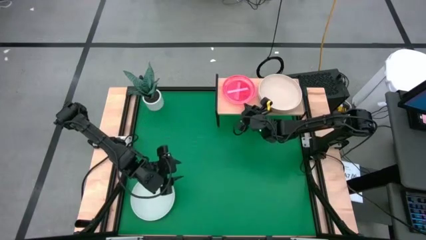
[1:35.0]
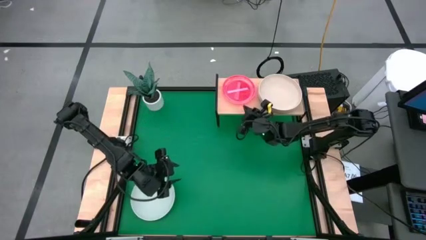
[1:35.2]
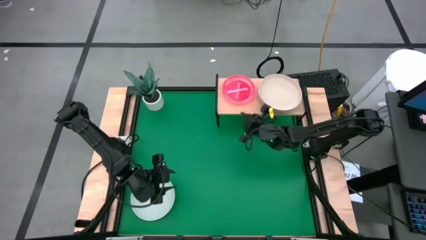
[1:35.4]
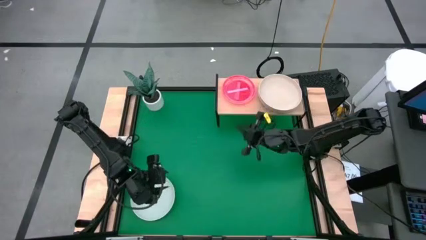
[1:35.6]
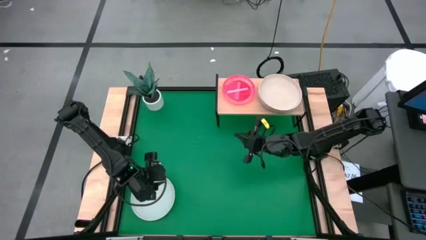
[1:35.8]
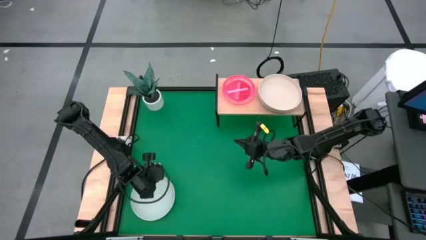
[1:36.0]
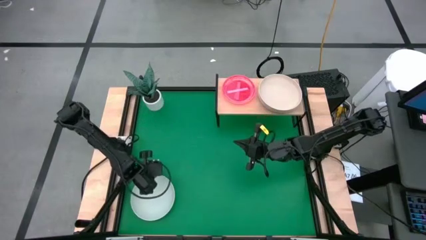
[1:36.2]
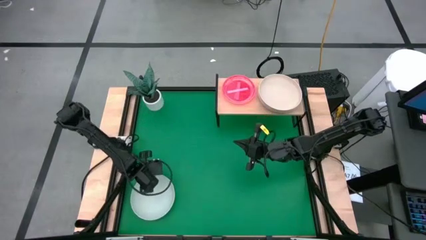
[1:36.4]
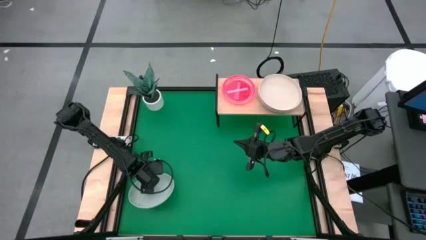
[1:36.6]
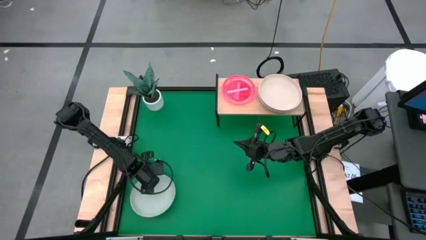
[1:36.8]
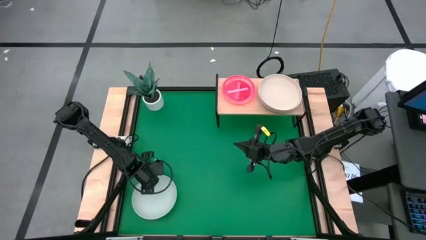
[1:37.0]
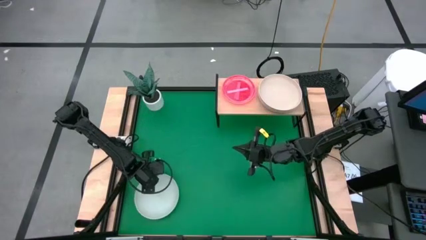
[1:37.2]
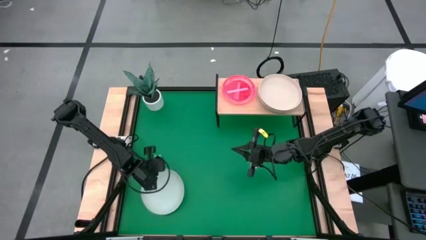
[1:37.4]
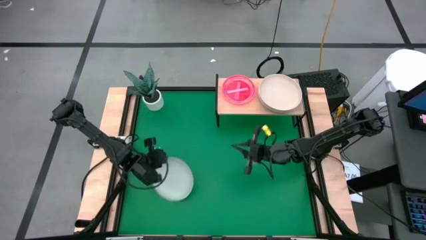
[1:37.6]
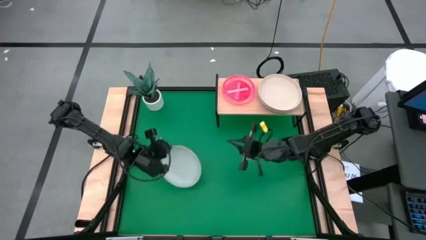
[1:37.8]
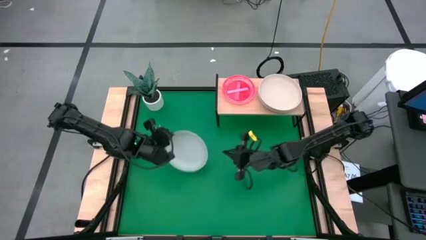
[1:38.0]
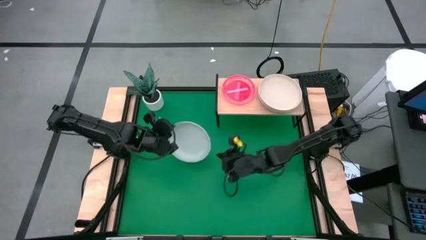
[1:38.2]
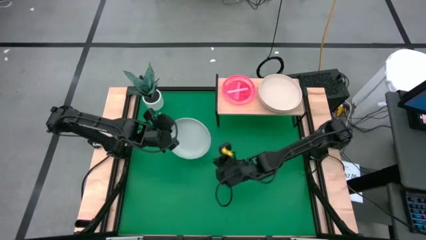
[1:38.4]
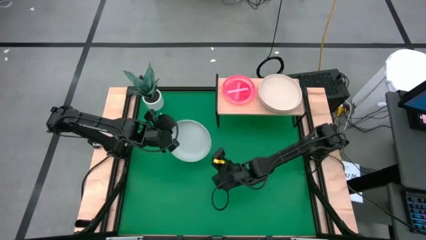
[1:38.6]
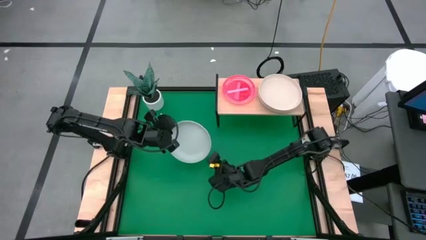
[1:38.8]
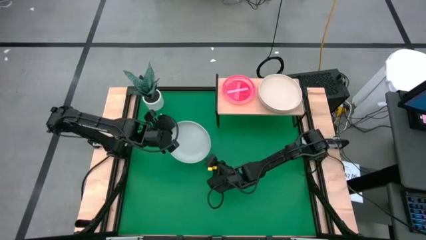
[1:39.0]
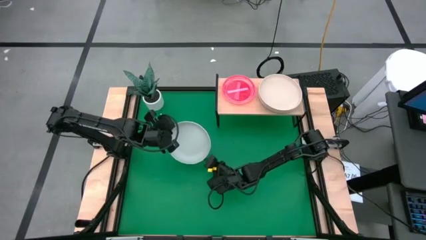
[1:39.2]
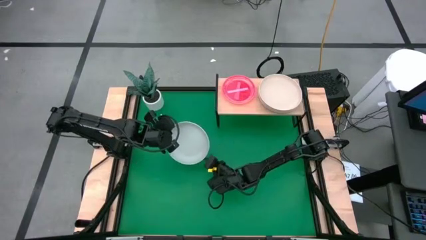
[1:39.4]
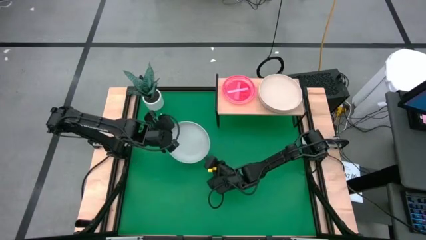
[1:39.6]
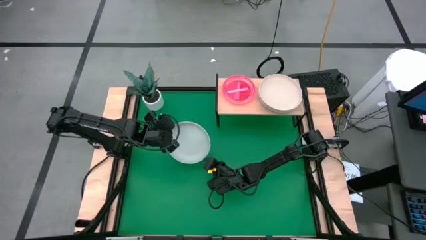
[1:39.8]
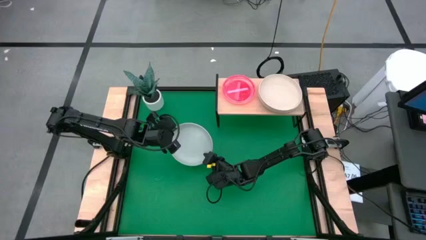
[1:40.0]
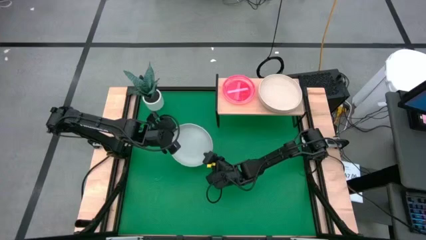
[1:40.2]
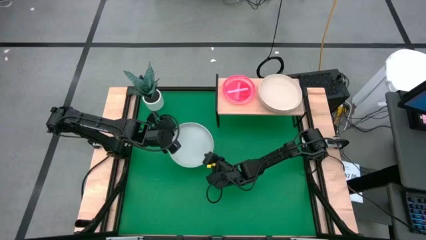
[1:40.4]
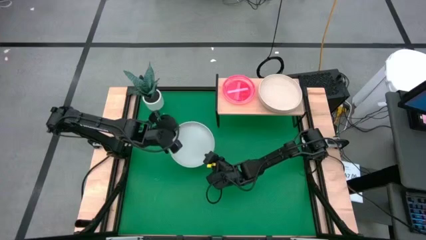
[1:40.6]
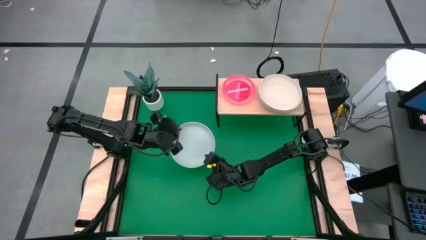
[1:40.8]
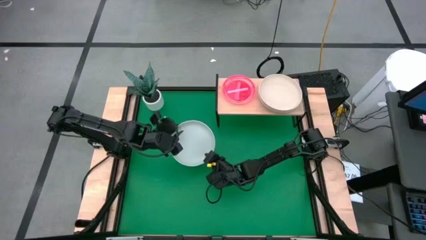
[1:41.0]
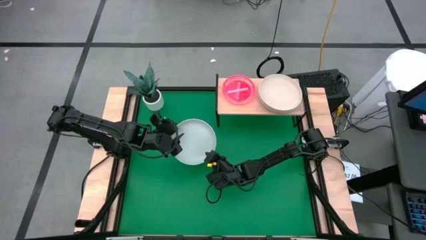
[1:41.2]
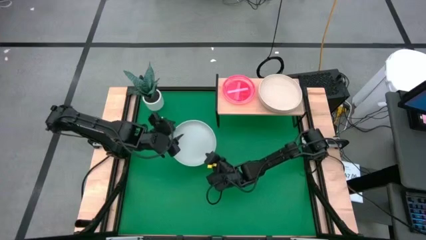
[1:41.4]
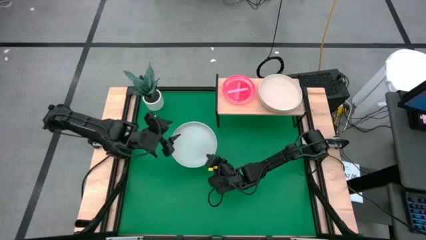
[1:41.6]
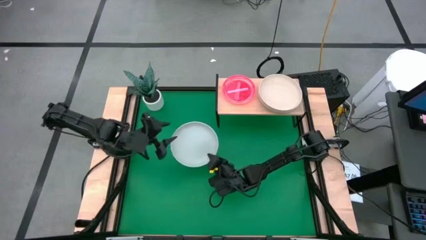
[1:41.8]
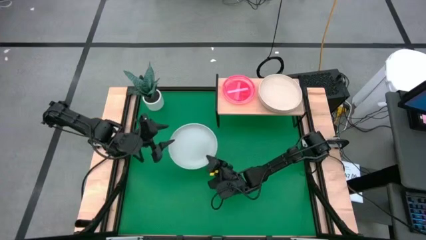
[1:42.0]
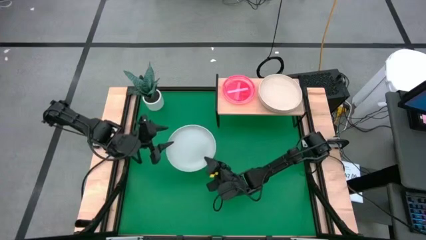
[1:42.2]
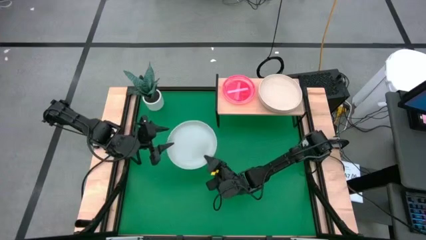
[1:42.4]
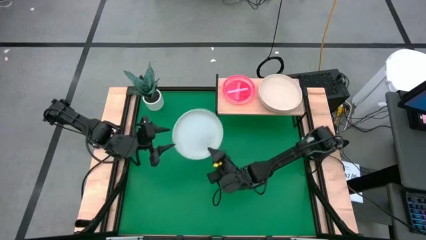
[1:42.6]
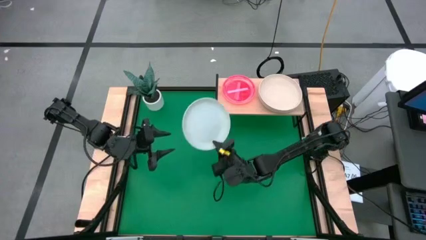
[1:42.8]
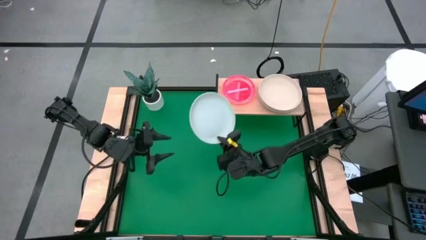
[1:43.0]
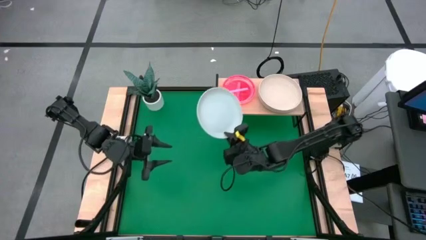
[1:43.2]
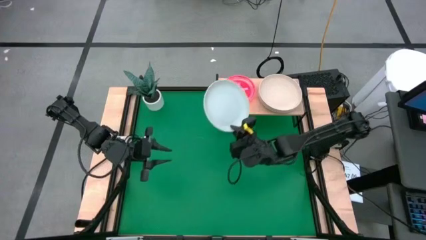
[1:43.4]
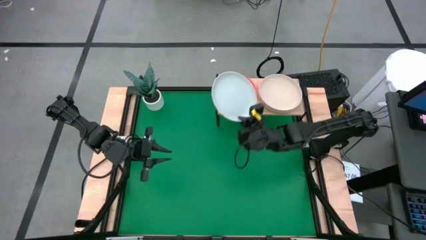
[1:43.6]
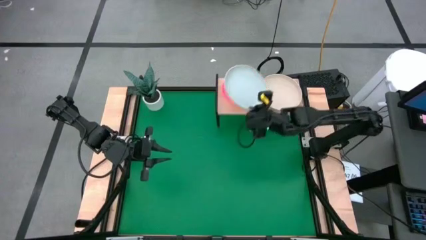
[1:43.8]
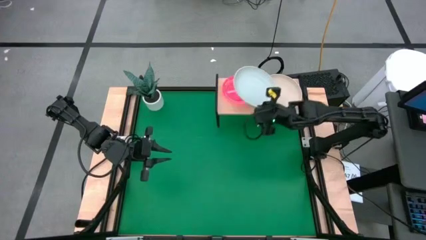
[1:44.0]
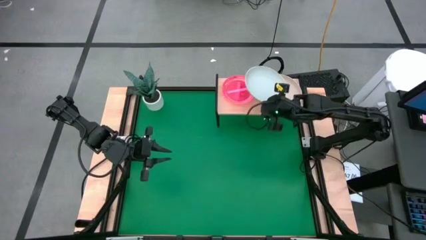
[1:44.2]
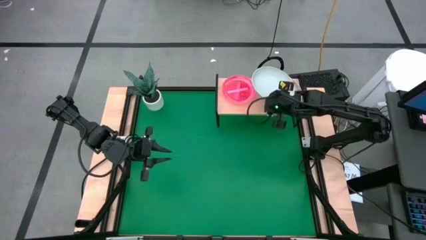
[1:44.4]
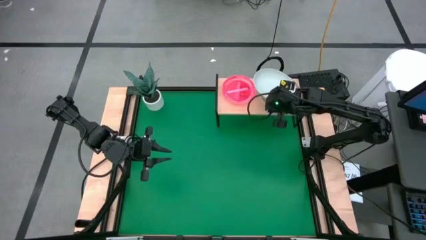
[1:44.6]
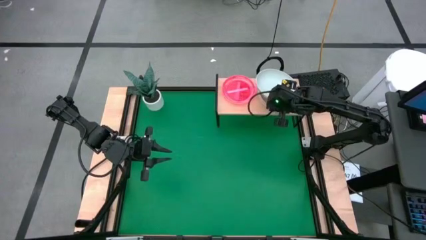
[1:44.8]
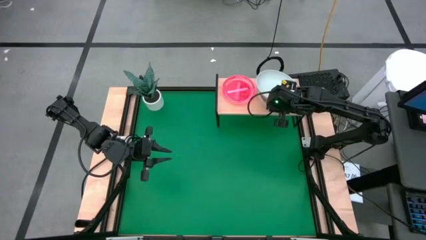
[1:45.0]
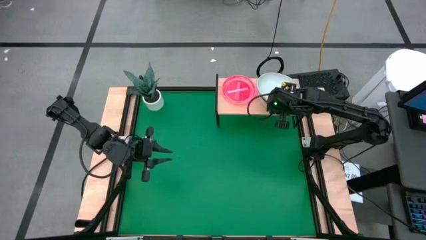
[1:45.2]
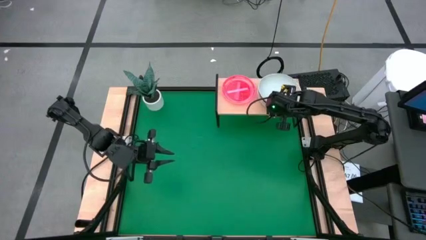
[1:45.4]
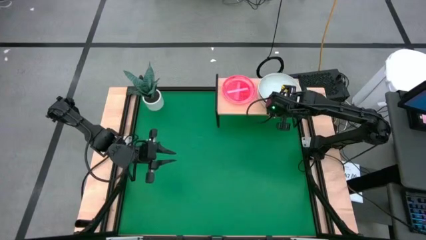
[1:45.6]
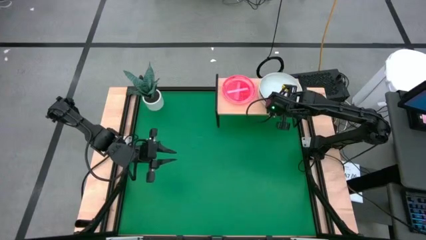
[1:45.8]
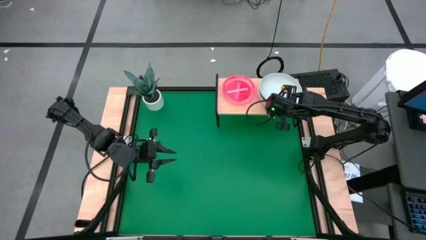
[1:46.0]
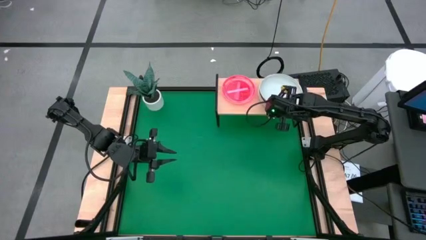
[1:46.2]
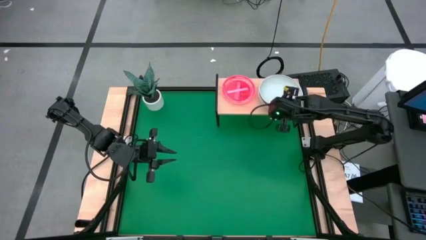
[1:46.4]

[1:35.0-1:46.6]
Task: Place and stack plates onto a shelf
Stack the large gray plate on top of the large light brown plate on the shelf

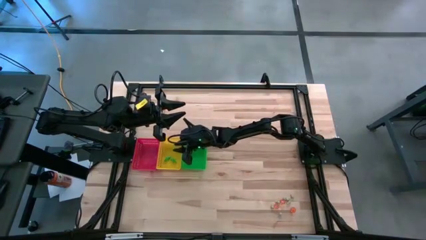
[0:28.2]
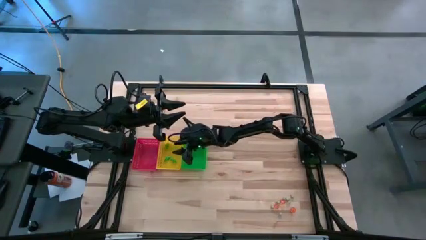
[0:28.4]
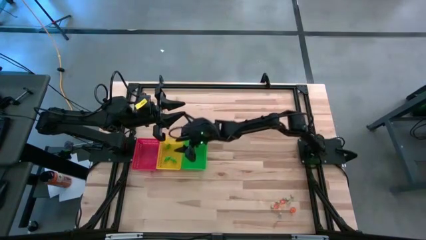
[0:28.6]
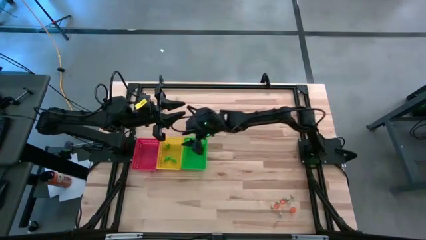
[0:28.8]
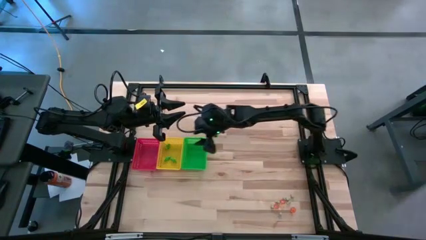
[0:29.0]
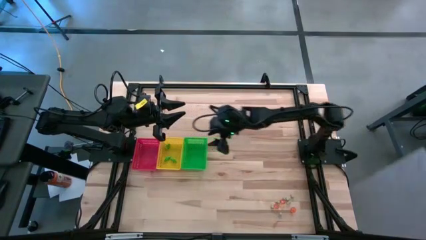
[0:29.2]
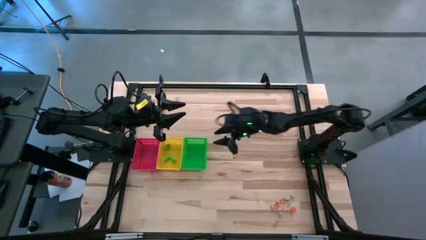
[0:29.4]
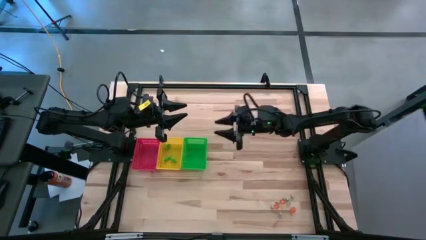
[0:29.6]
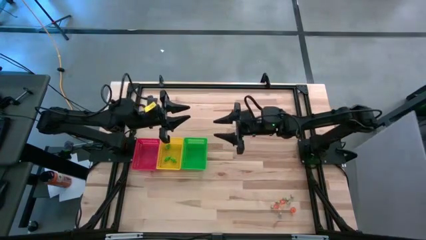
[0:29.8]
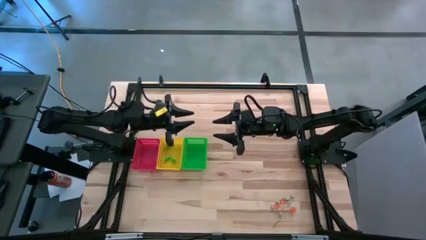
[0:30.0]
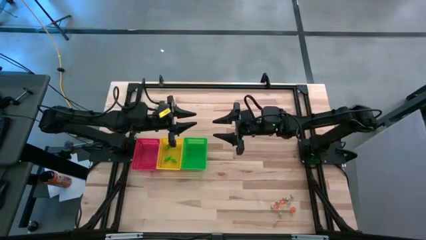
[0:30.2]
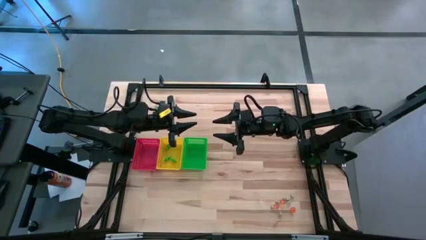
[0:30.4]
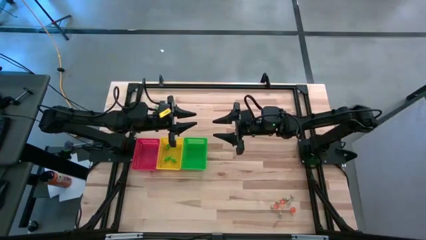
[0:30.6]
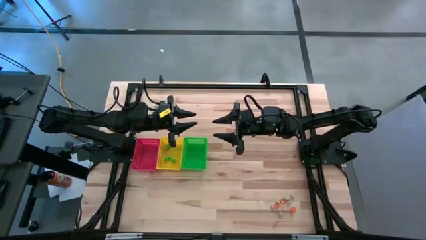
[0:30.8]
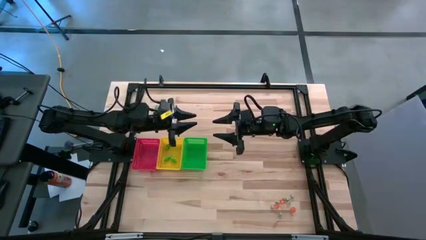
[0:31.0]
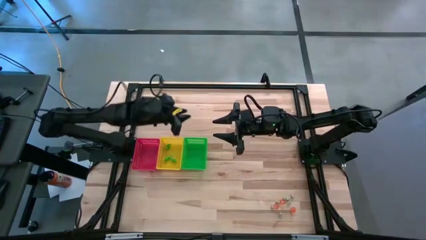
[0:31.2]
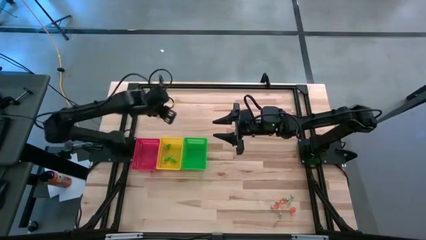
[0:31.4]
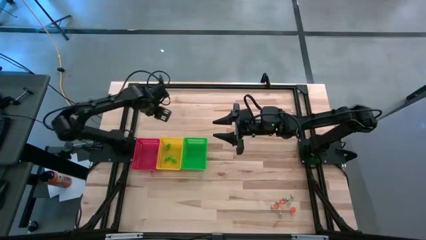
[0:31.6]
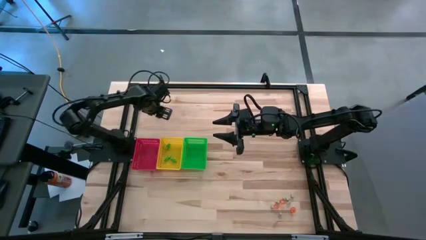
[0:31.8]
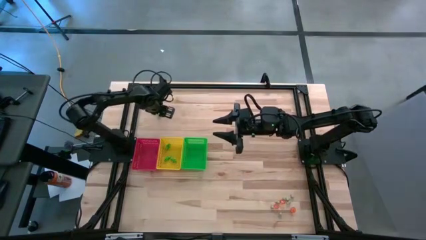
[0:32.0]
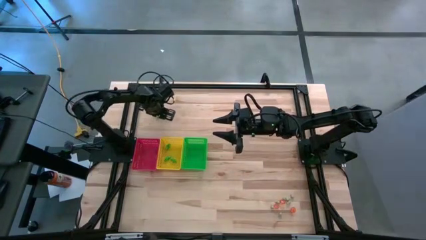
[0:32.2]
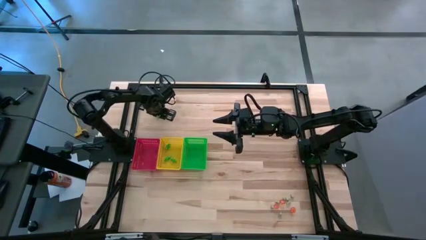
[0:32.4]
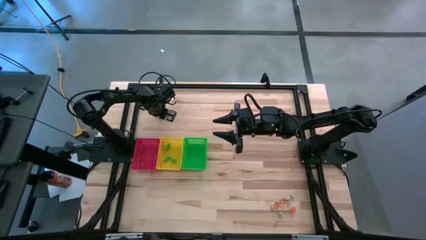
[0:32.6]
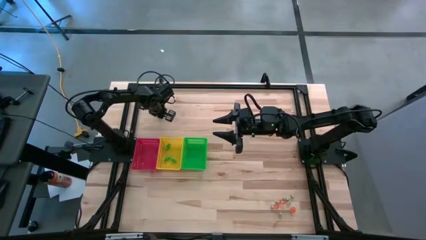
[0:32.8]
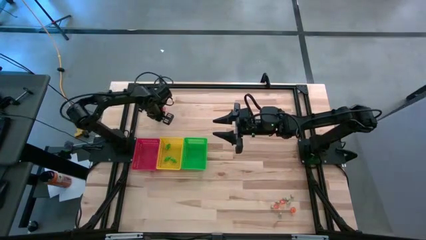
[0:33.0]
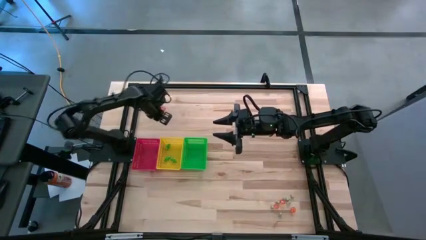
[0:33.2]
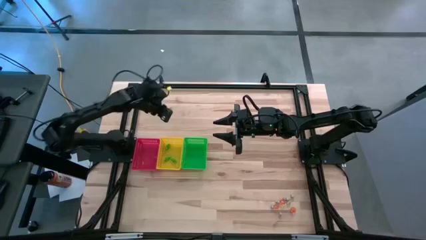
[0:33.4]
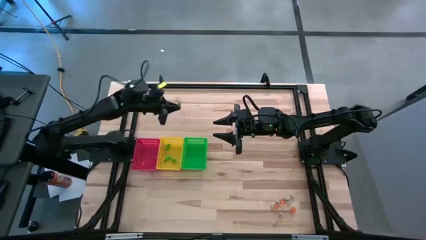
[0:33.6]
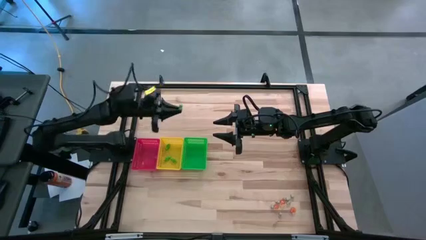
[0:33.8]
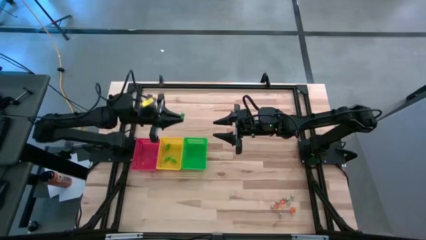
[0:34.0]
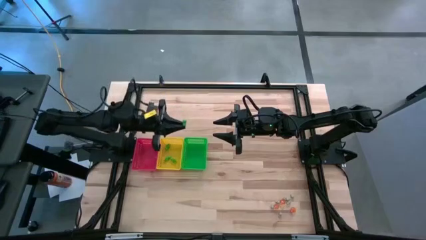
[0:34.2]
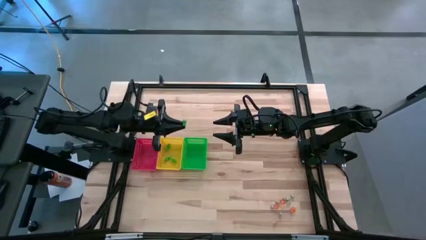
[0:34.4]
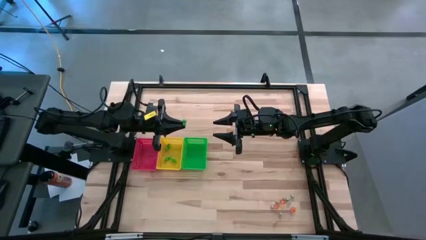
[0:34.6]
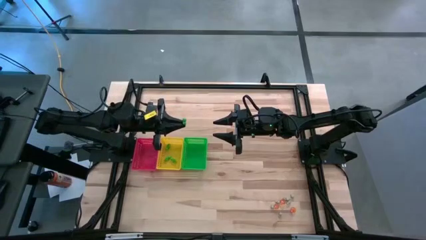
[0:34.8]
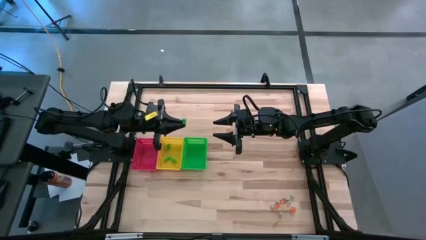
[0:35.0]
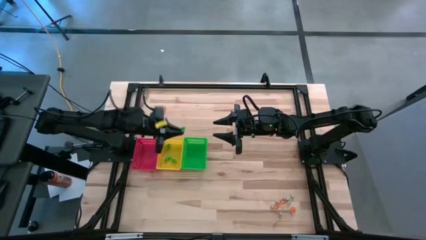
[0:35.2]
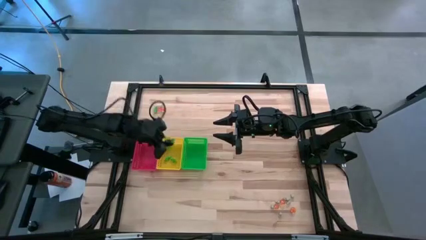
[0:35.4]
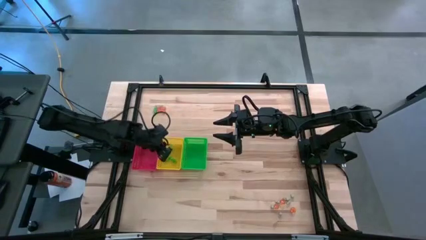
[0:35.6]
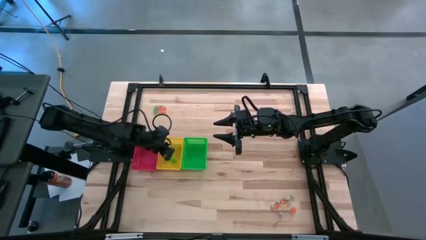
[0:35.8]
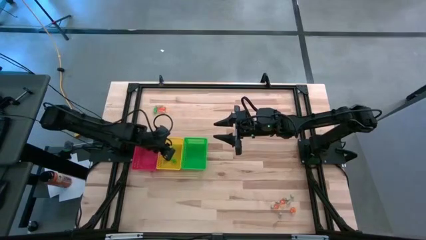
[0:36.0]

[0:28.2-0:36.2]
Task: Sort Halloween decoration
Put the green skeleton toy into the yellow bin
